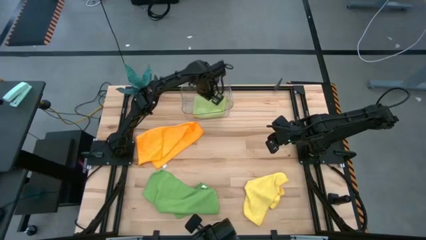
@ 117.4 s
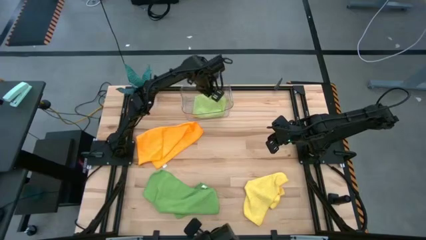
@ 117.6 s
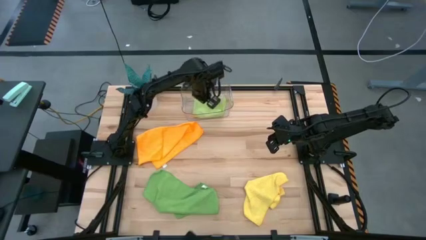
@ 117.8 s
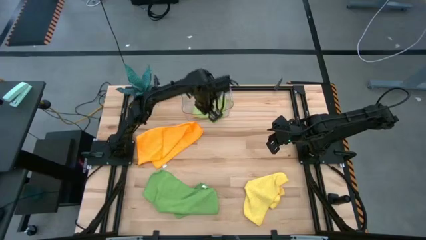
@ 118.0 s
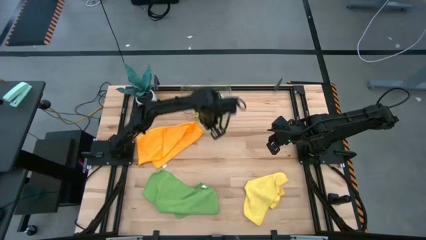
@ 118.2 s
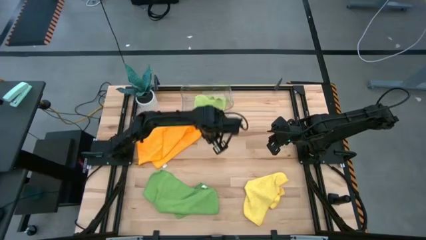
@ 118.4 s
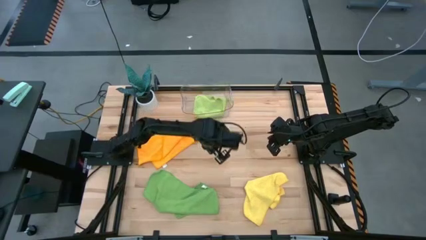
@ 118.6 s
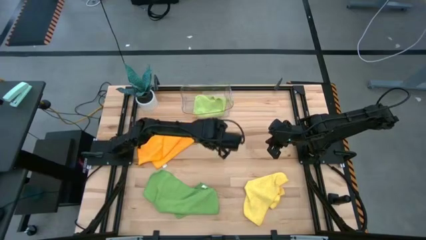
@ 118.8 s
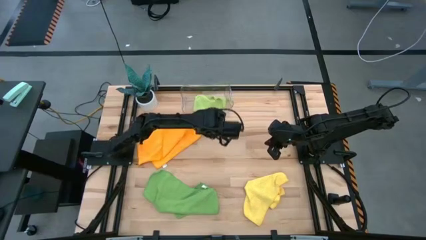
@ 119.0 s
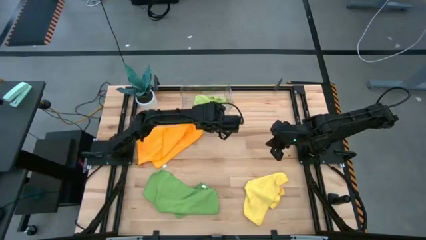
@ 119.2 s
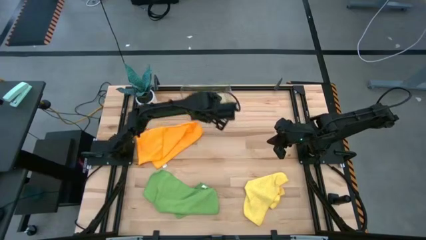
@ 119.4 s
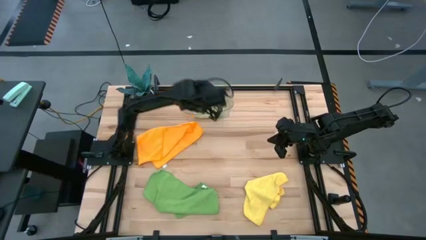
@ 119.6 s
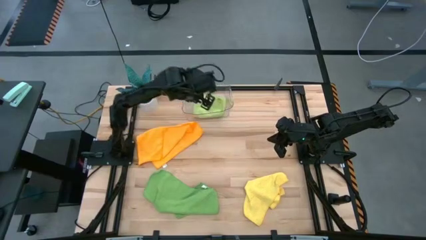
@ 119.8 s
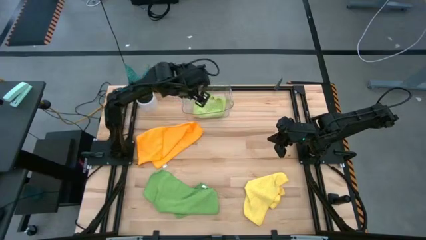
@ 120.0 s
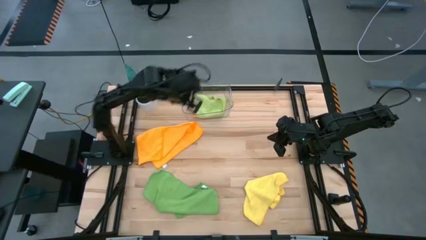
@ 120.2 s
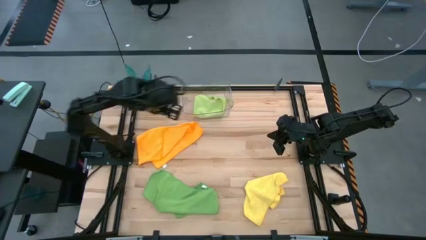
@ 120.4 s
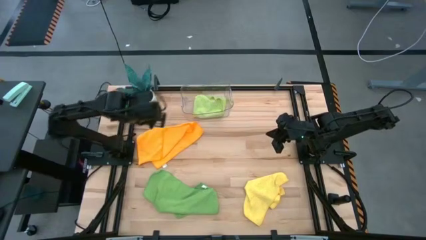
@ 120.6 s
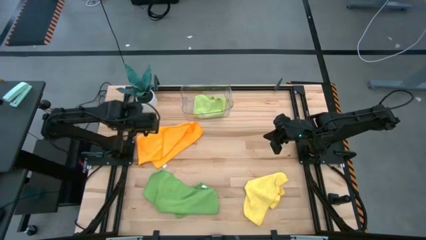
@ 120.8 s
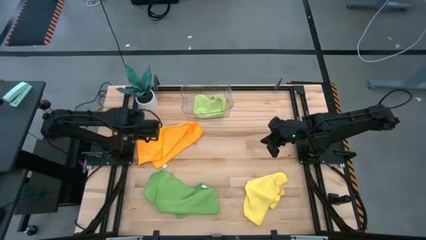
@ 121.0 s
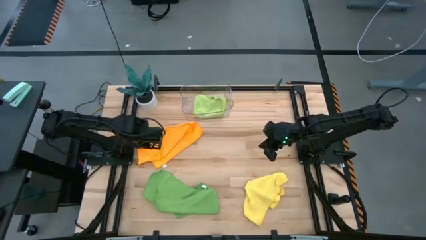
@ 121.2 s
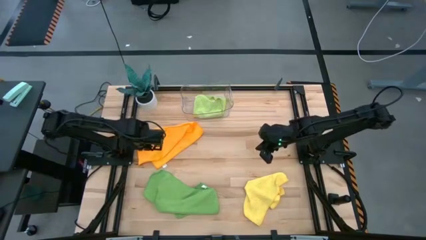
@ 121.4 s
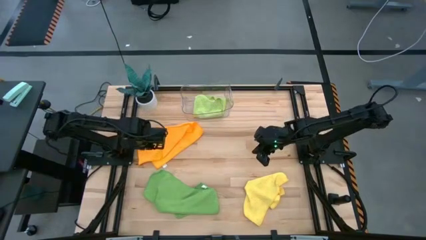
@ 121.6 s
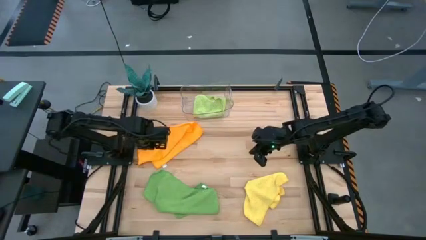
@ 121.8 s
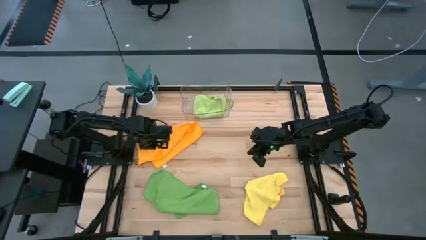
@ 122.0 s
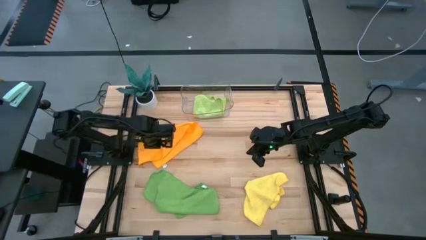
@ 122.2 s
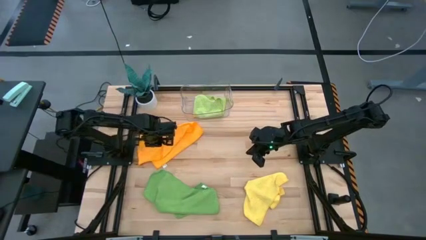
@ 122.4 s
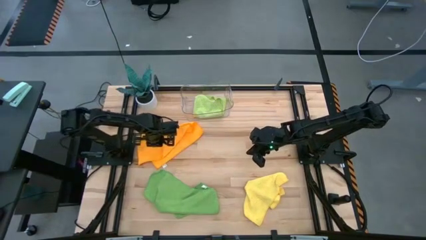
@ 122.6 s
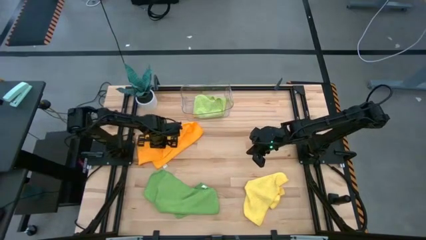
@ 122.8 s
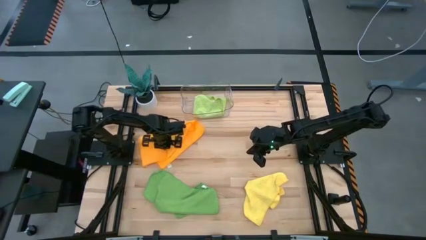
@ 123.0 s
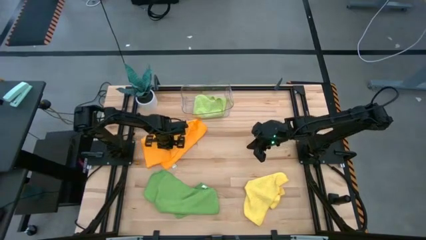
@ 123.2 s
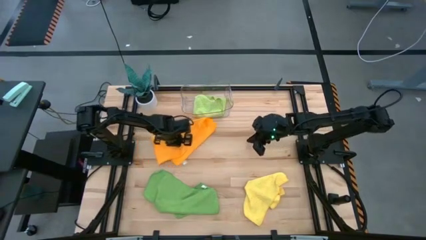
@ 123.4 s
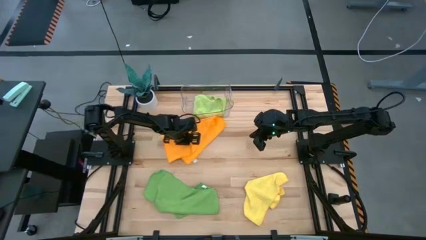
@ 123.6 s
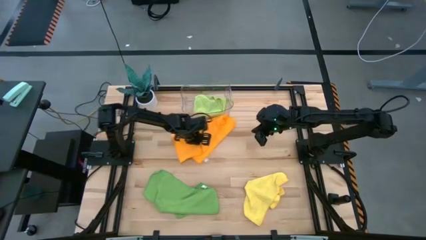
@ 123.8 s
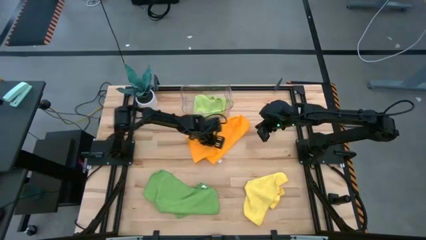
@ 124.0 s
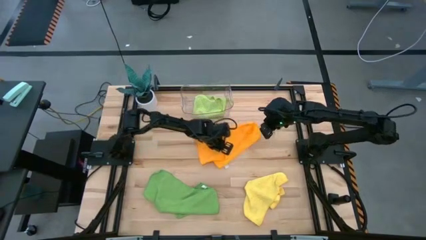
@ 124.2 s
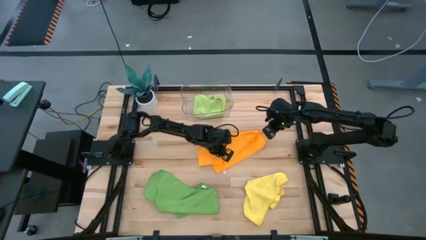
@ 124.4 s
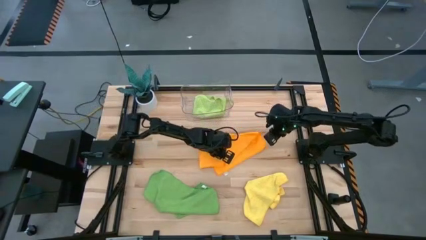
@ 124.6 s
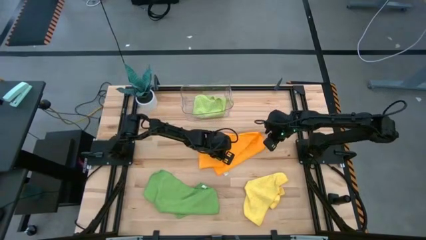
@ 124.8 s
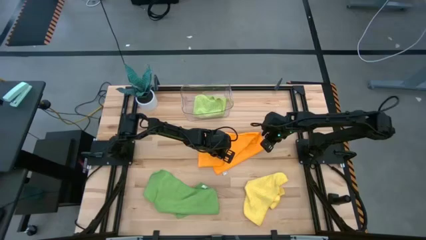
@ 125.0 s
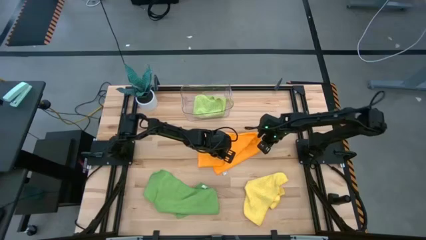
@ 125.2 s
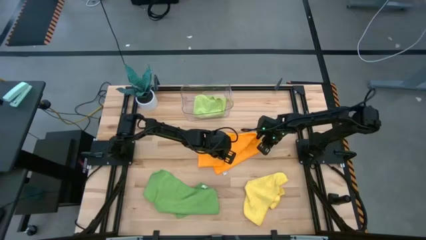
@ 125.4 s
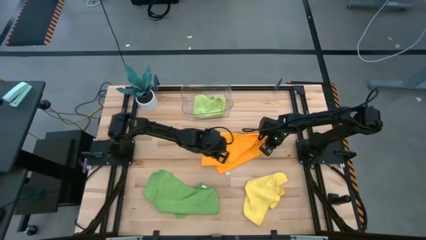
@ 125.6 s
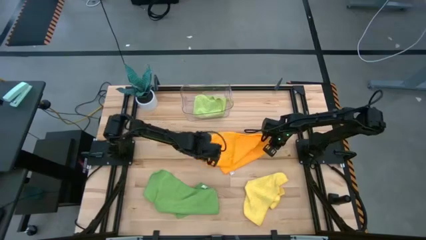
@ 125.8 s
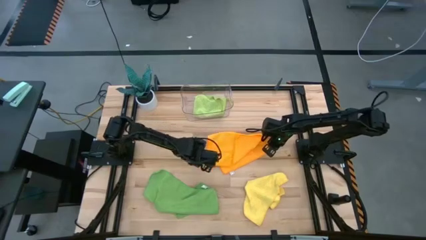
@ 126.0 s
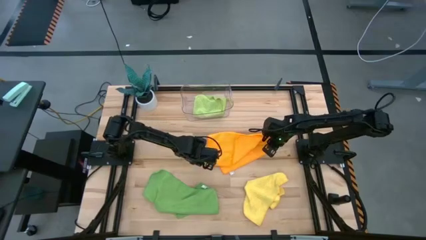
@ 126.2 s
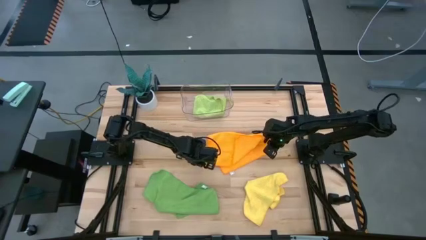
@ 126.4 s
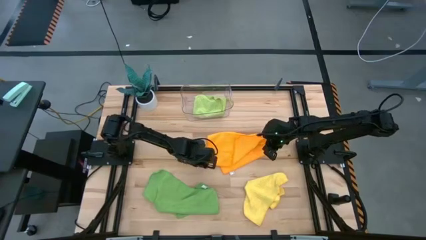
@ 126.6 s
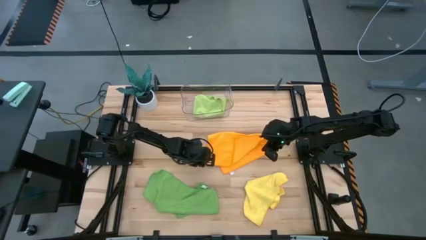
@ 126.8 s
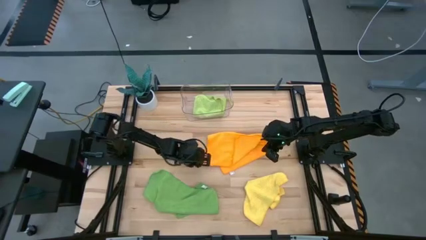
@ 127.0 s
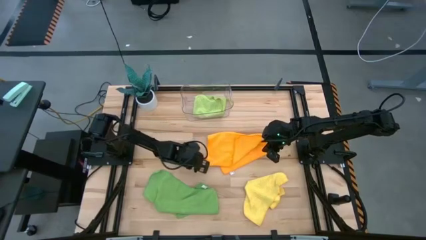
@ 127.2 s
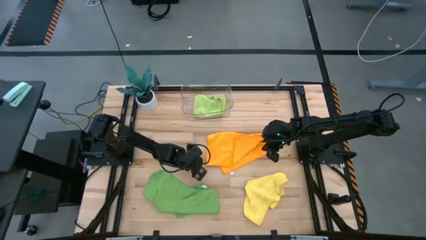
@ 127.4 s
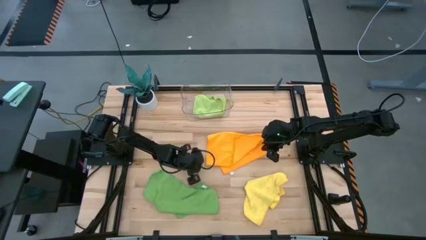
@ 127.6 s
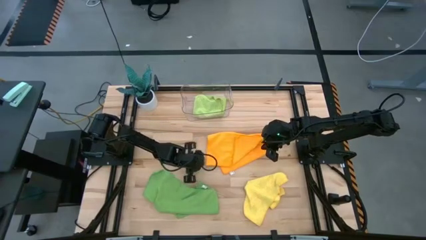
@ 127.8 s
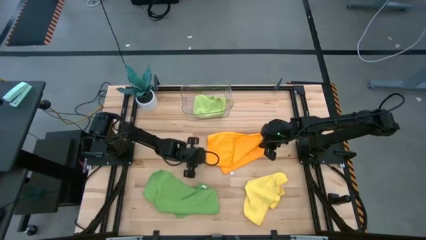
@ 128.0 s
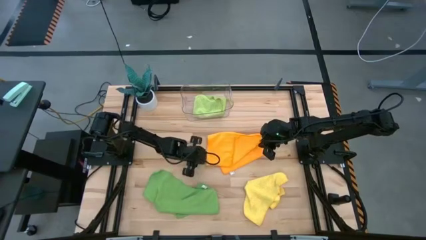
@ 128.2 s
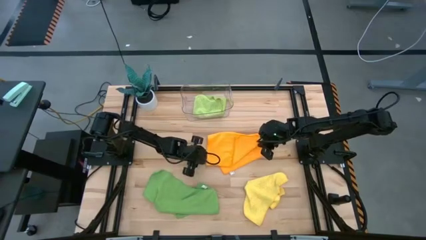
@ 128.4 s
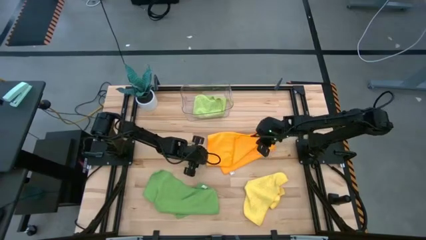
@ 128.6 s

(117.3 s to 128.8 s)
Task: Fold microfiber towels
Fold the orange microfiber cloth

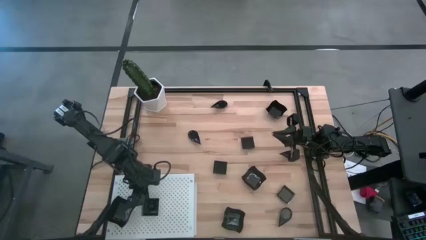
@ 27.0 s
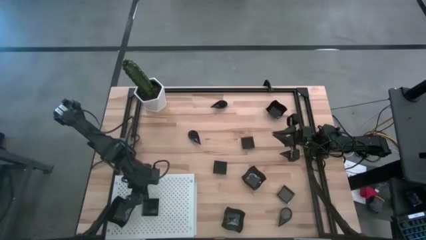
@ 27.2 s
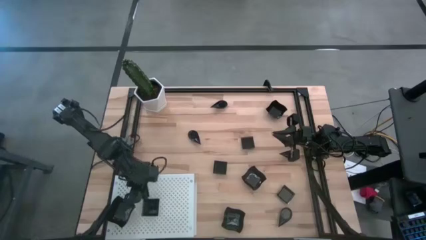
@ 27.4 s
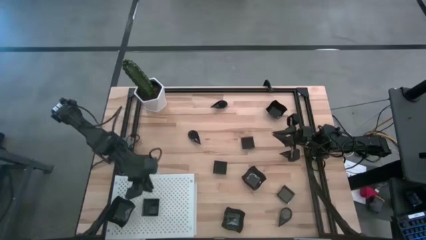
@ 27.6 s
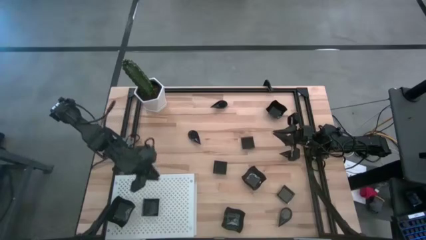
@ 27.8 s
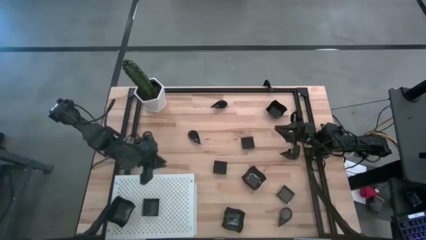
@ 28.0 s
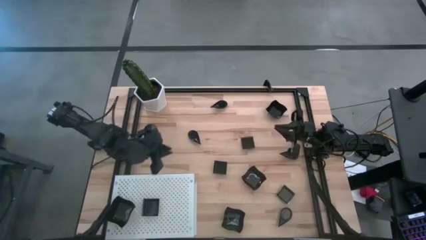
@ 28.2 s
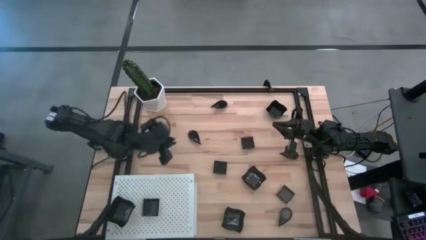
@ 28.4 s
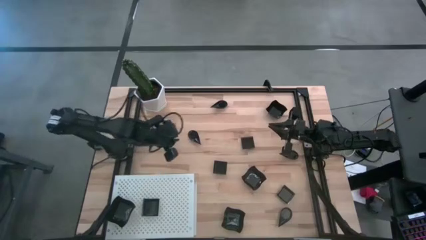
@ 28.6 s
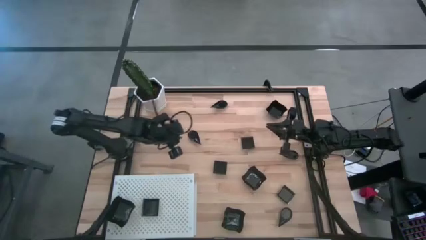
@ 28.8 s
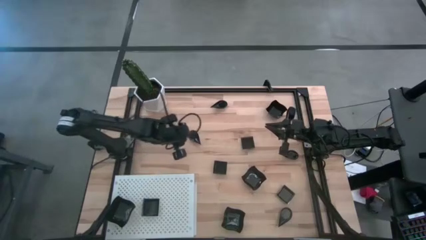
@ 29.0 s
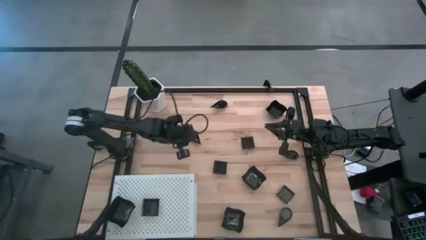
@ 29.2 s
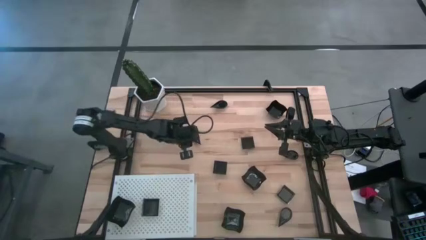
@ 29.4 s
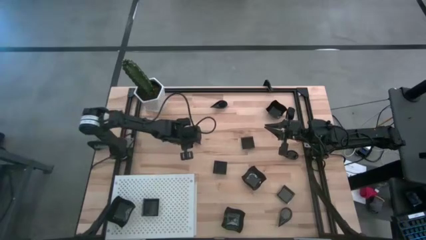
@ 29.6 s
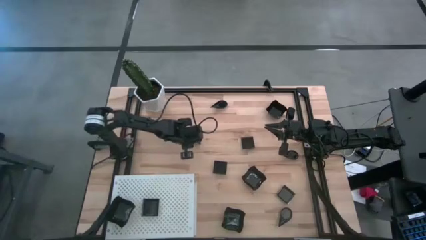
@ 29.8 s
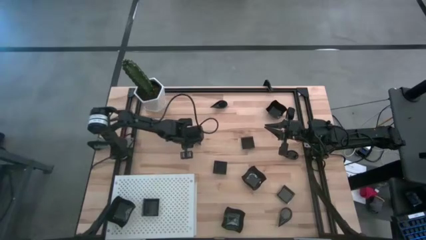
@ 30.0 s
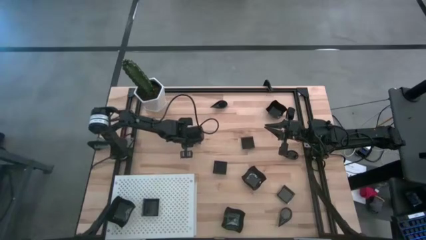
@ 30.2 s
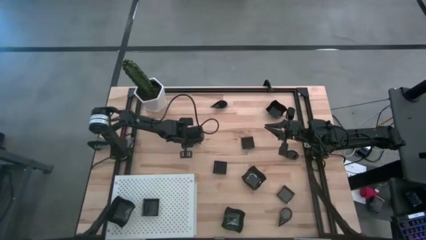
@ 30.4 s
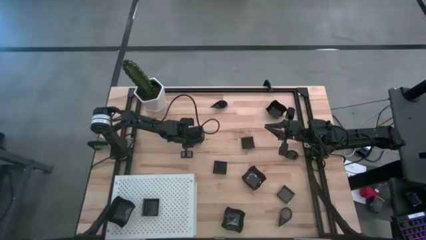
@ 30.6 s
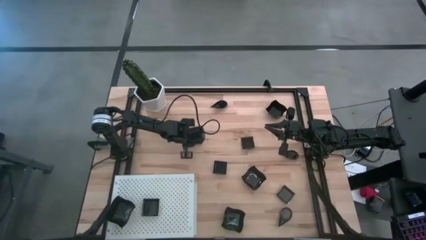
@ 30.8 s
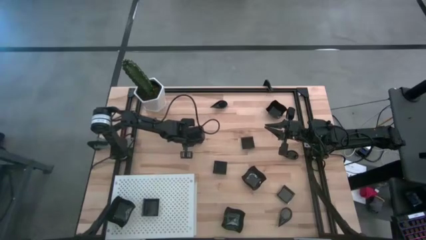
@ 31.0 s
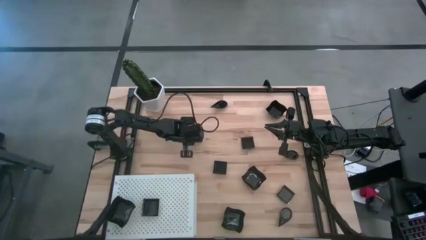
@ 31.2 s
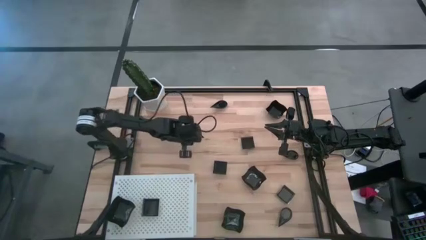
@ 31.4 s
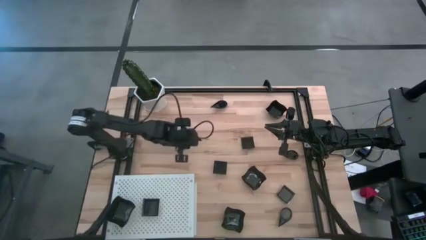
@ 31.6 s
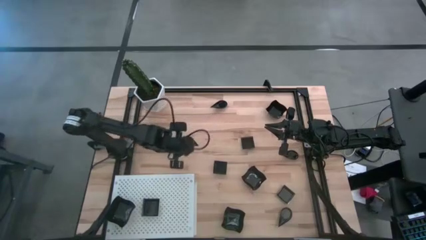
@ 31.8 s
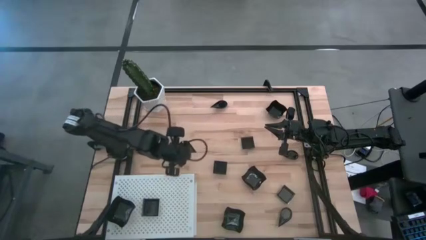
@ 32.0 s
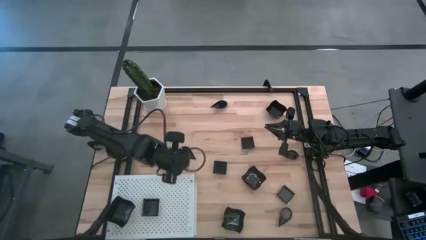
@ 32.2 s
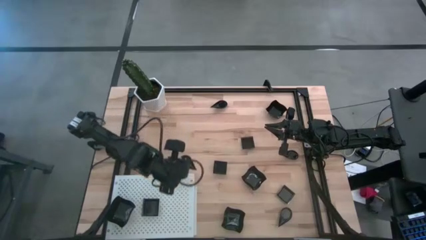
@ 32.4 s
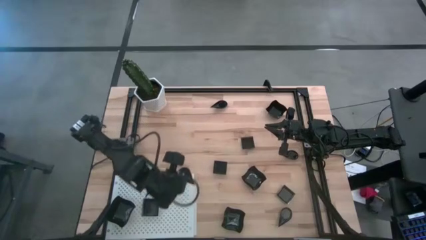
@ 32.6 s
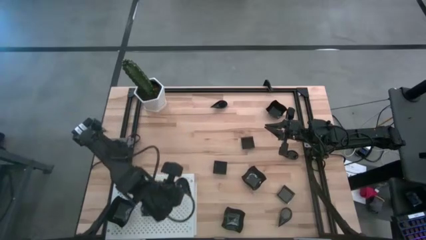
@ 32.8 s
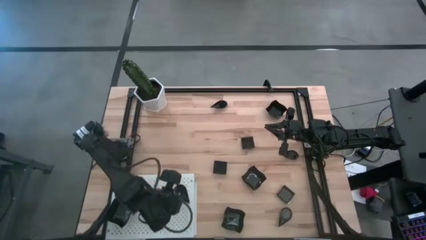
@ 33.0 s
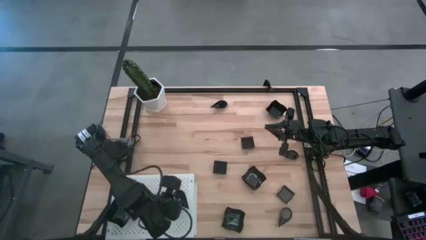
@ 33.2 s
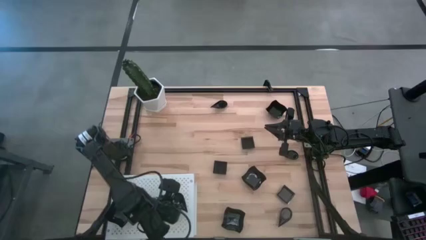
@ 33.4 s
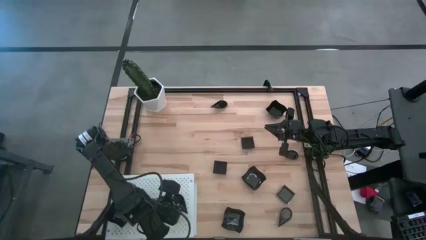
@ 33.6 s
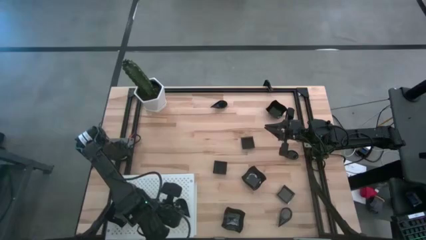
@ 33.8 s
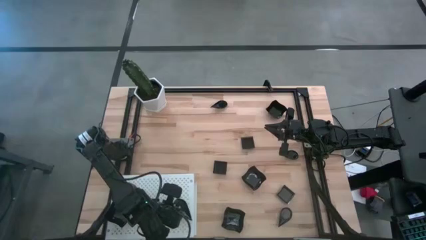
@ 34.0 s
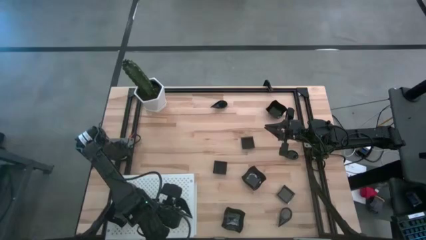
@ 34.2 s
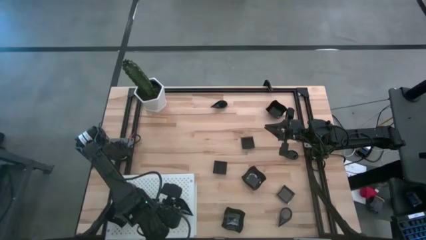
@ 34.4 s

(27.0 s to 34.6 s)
Task: Pick & Place Mini shaped plates
Put the drop-shaped plate on the shelf
